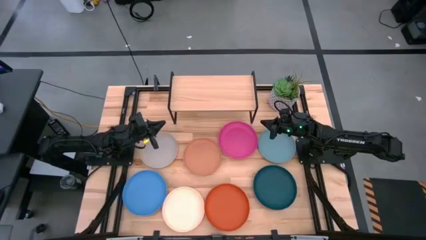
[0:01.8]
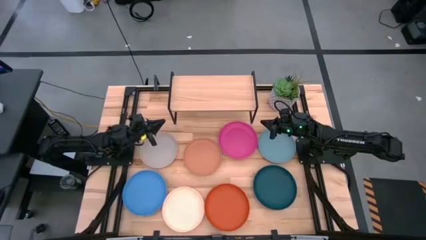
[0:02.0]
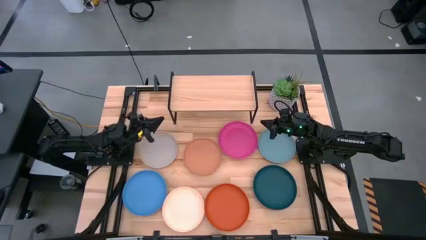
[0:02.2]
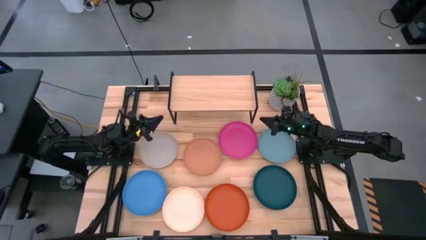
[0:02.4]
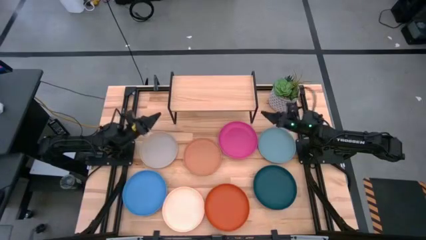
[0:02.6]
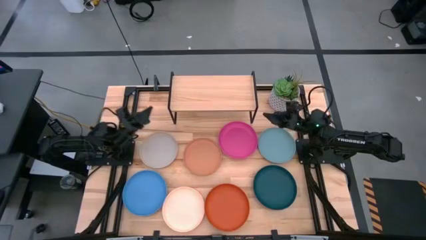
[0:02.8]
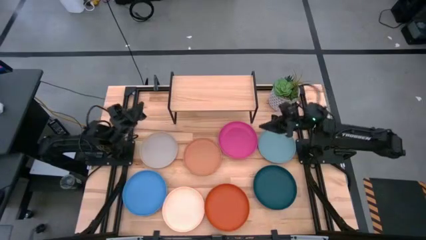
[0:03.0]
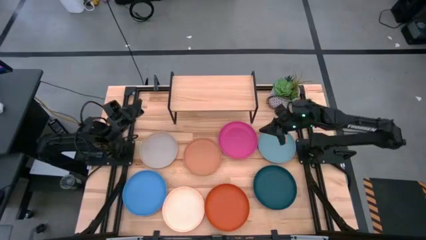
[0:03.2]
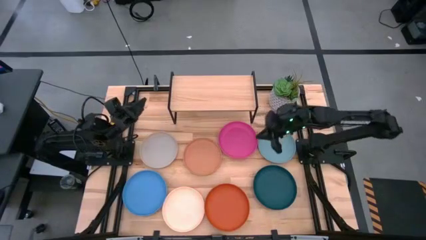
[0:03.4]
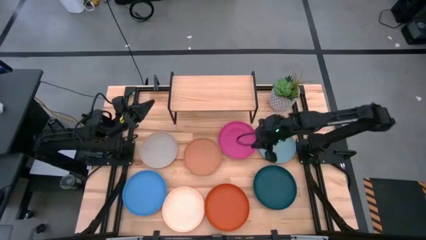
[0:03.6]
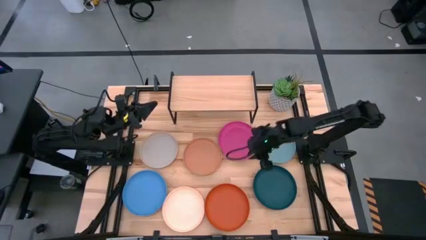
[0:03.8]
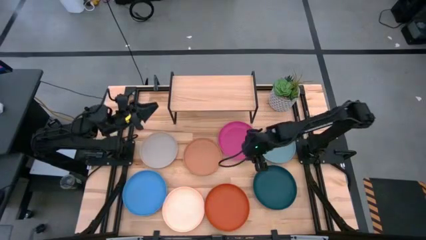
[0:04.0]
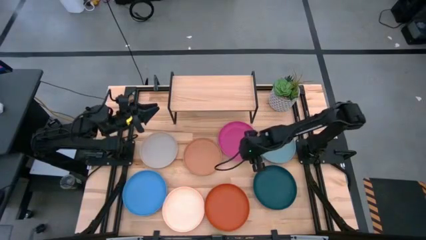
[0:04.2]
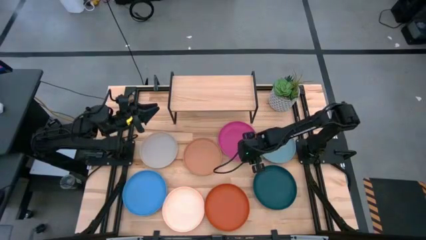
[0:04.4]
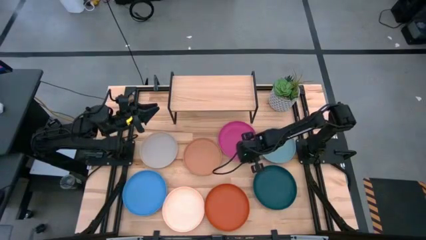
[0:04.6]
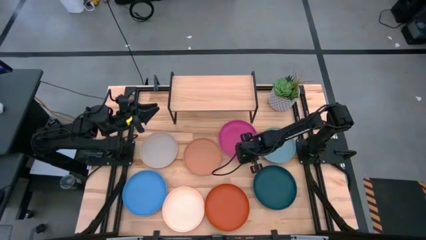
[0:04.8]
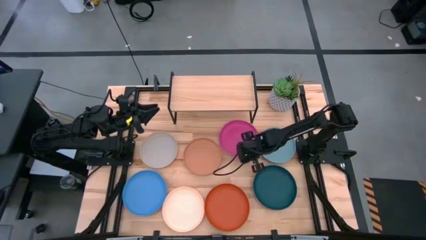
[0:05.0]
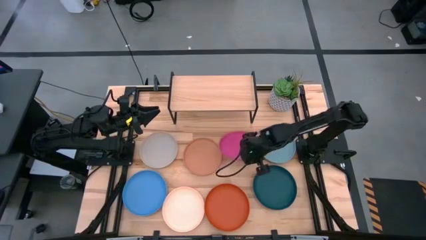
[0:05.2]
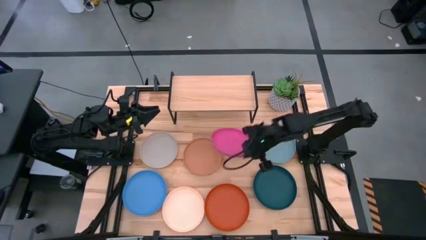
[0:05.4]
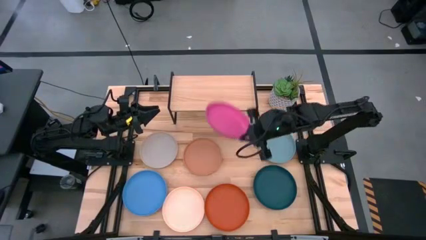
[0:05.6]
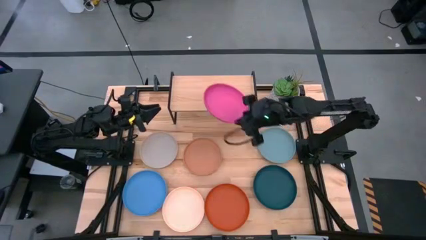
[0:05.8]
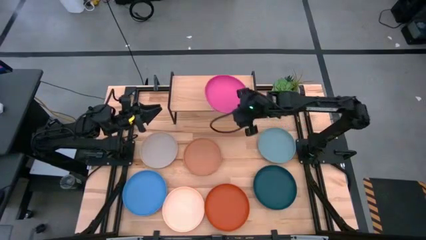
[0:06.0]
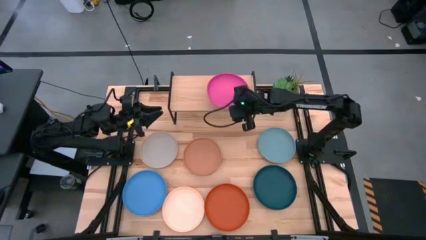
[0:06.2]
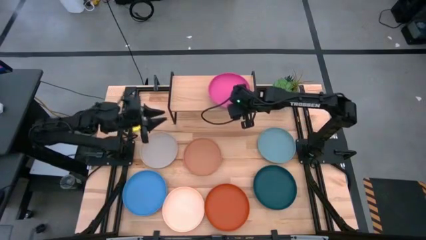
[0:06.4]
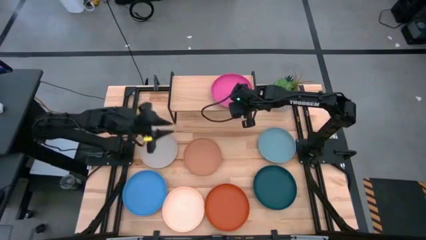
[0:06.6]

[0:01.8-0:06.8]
Task: Place and stack plates onto a shelf
Put the pink plate on the shelf

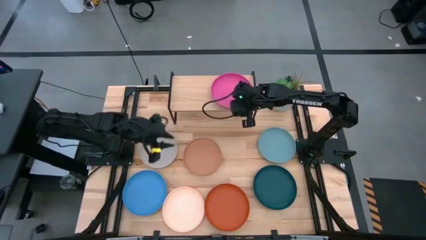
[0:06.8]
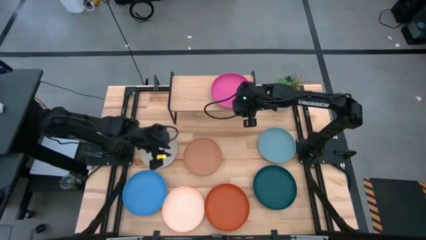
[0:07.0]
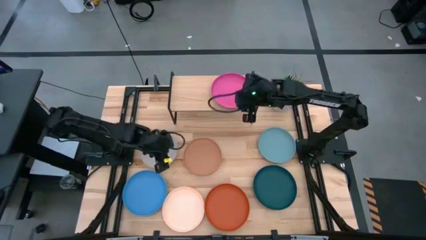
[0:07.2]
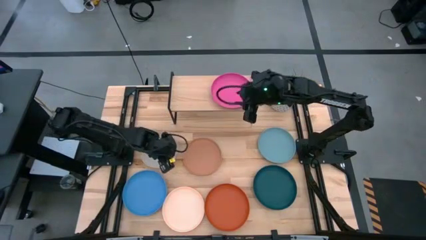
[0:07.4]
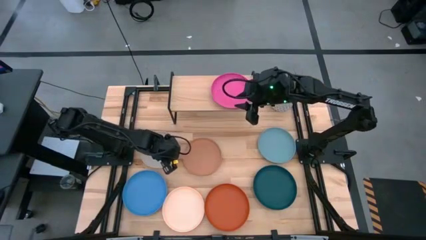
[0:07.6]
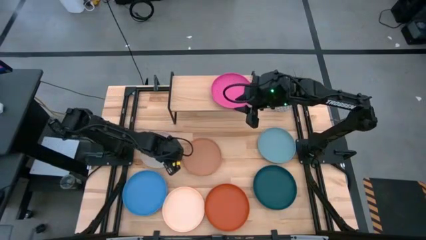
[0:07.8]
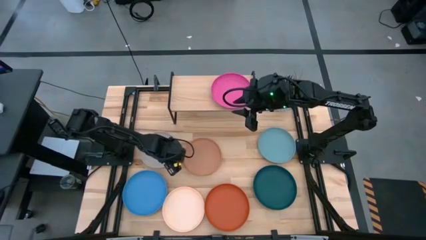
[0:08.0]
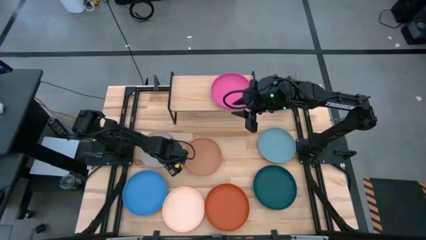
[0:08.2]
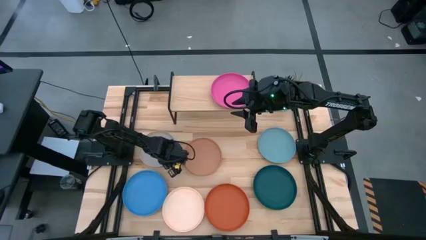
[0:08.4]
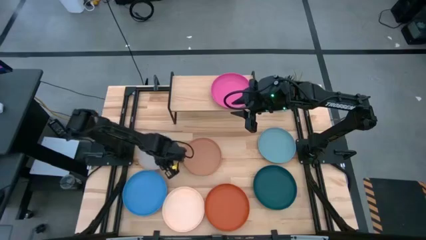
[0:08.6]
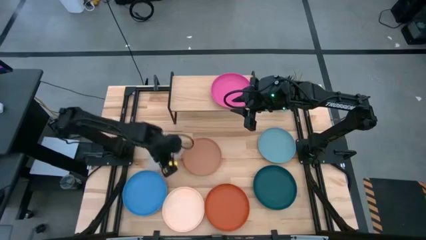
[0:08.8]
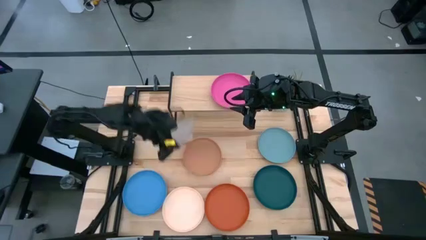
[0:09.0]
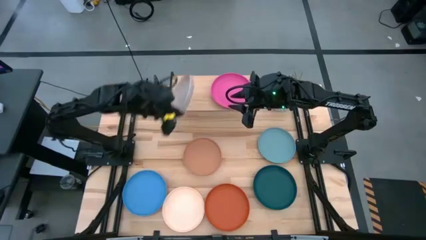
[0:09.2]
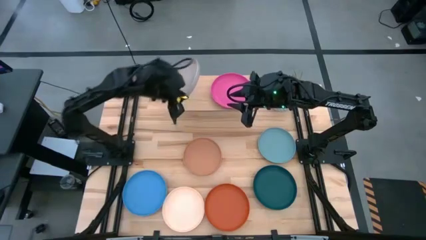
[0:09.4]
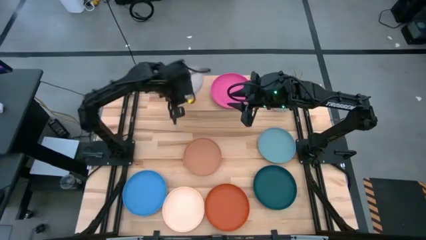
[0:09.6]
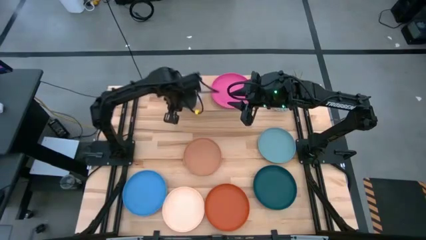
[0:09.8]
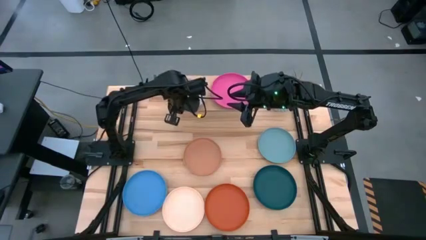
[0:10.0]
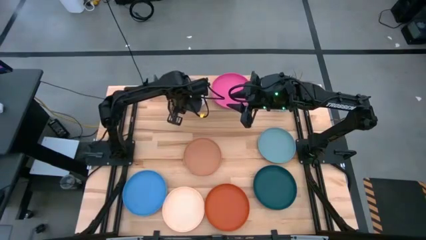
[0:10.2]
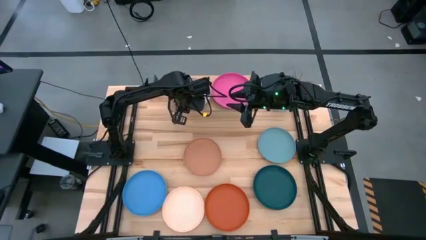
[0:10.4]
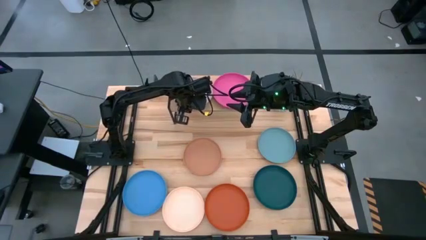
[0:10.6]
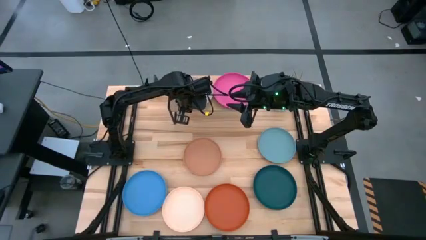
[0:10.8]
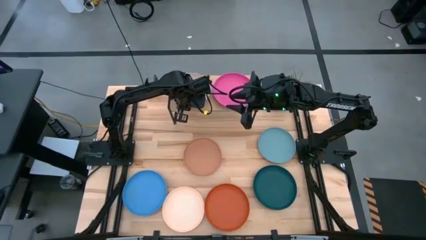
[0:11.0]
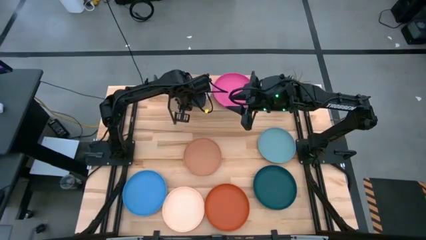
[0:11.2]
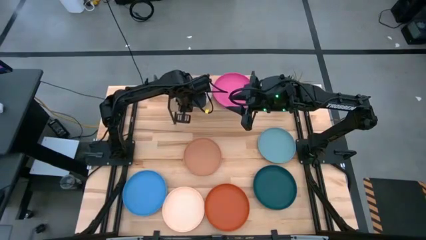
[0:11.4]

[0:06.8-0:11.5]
Put the gray plate on the shelf

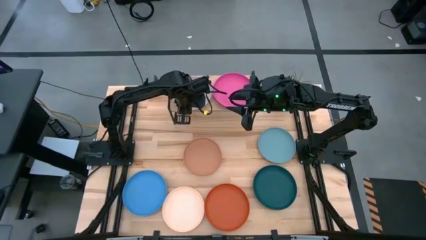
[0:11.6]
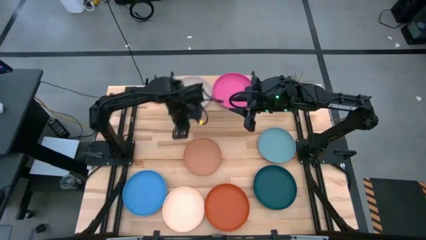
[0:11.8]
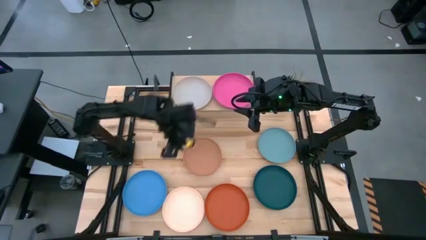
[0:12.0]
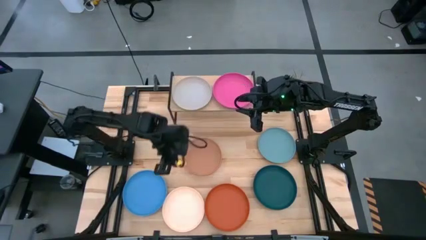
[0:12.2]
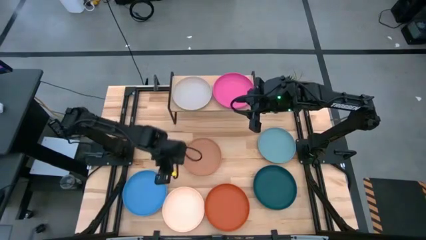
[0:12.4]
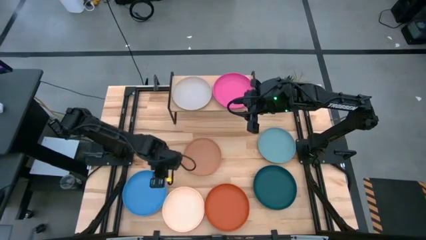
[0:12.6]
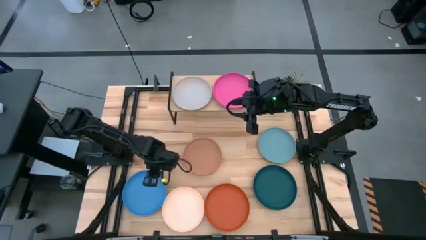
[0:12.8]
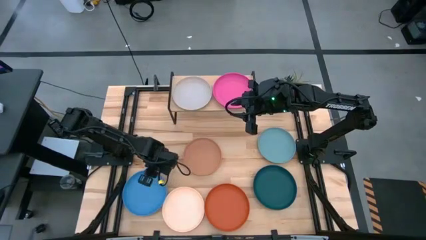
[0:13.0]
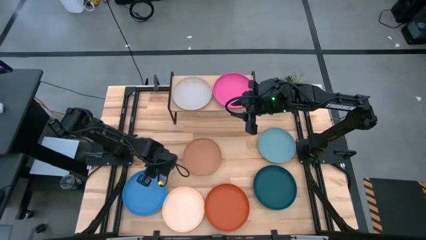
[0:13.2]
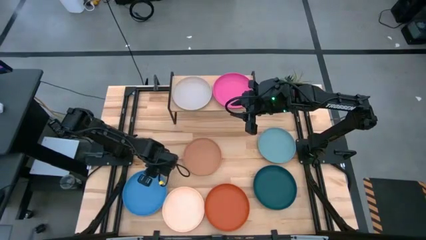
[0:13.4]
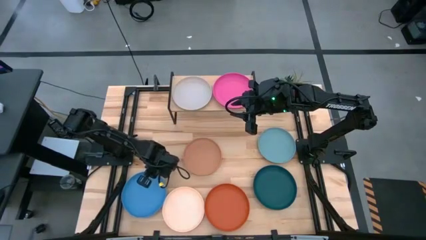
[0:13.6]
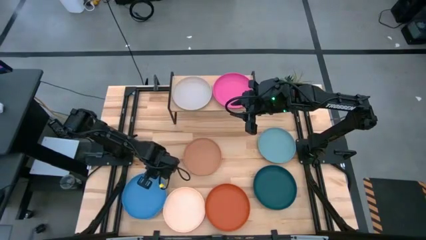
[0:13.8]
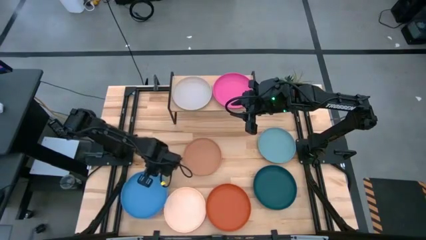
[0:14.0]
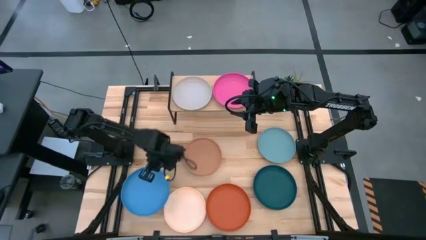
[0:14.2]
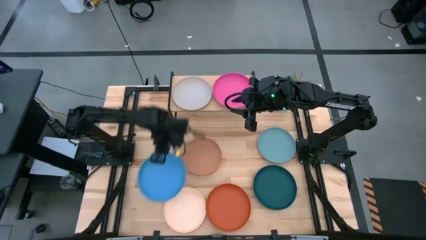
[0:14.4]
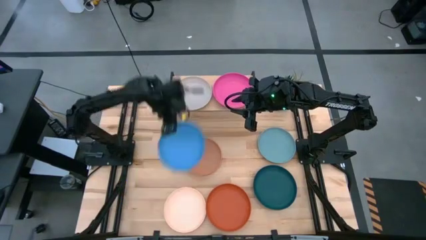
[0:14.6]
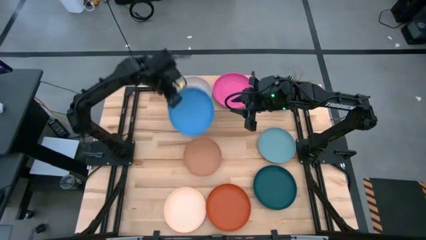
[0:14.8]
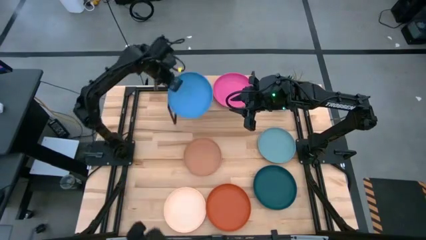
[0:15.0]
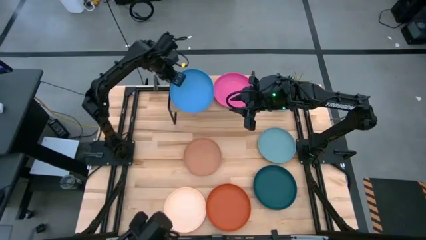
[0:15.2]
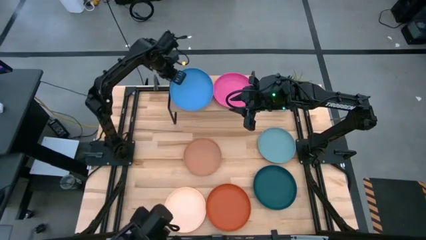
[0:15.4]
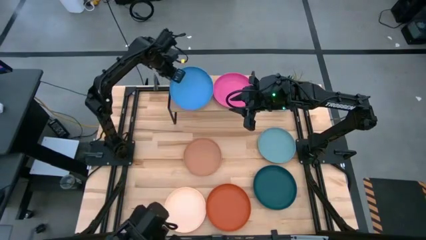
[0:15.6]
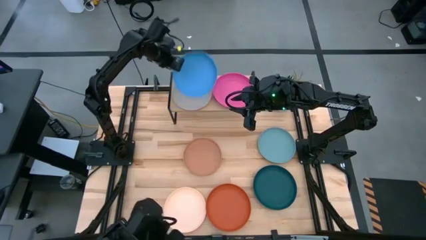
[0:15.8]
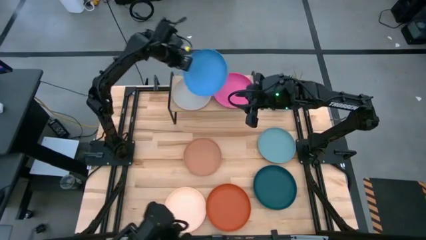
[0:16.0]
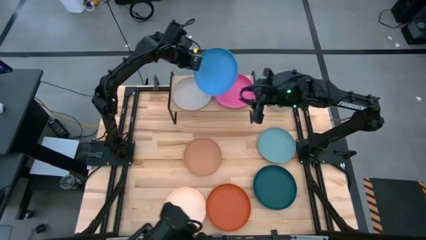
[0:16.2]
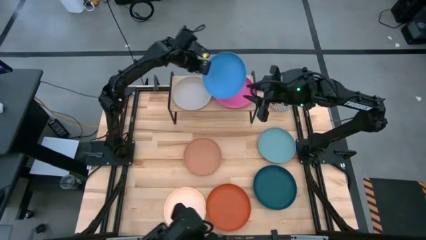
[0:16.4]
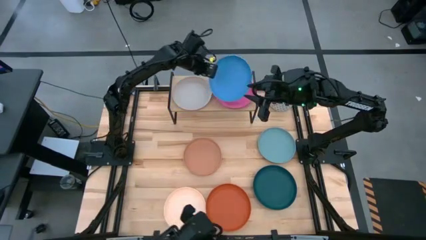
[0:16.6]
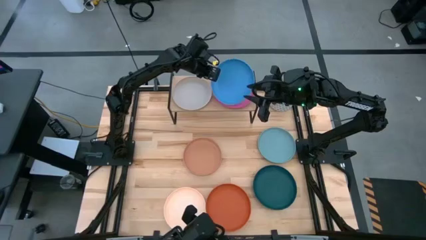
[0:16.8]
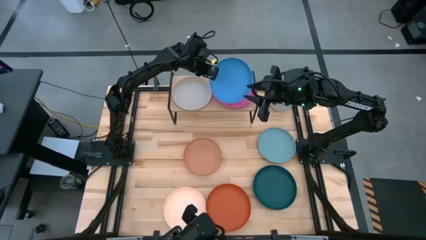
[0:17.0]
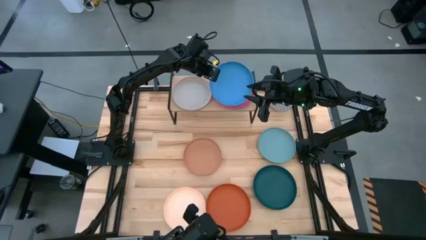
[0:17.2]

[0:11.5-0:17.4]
Stack the blue plate on the pink plate on the shelf

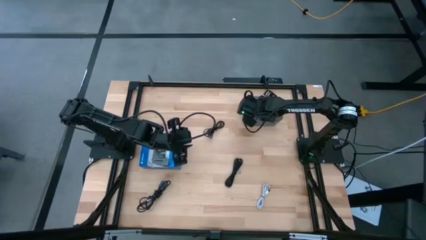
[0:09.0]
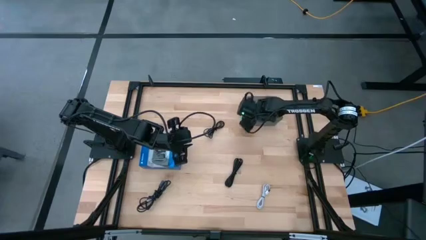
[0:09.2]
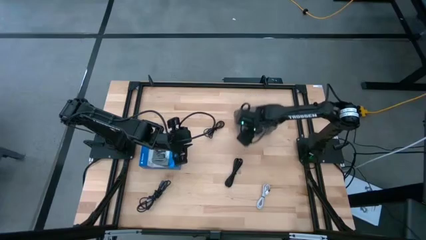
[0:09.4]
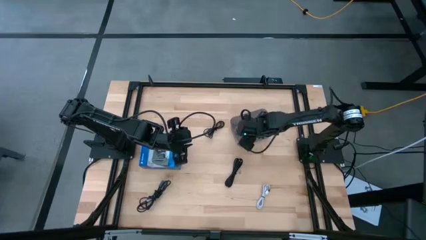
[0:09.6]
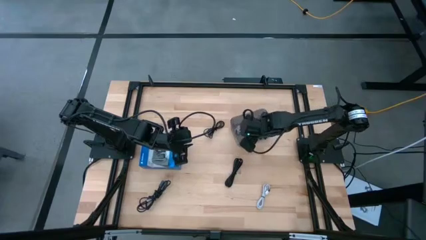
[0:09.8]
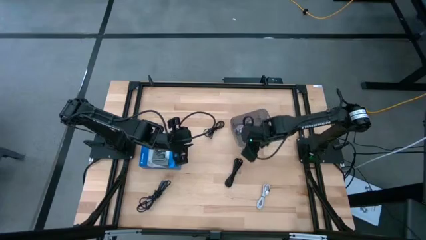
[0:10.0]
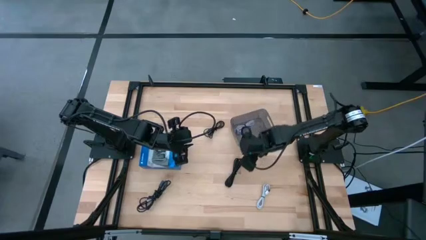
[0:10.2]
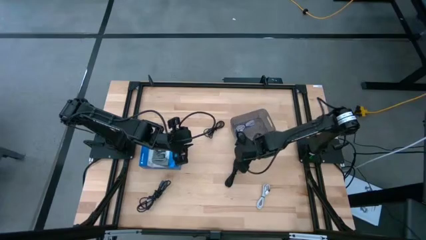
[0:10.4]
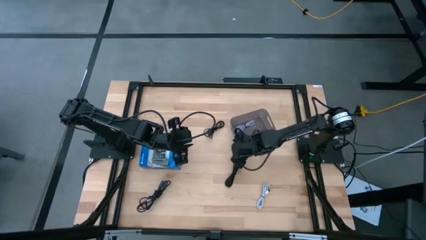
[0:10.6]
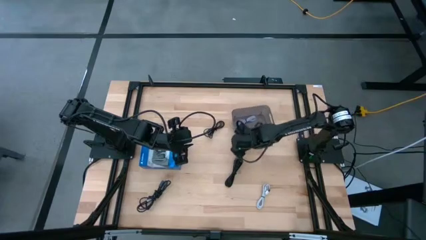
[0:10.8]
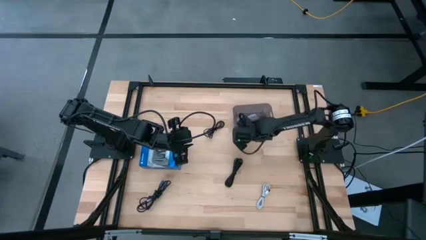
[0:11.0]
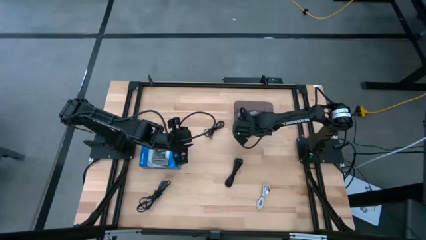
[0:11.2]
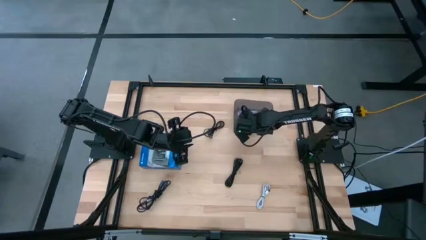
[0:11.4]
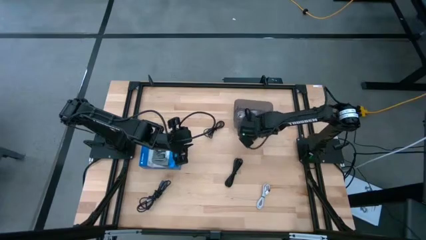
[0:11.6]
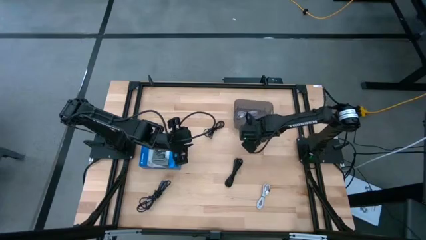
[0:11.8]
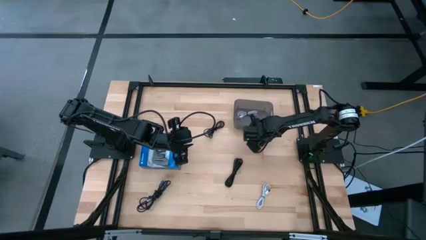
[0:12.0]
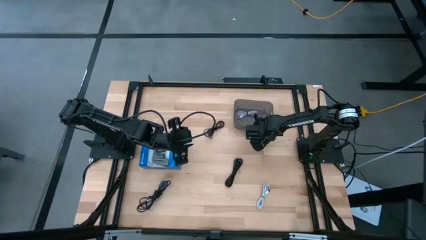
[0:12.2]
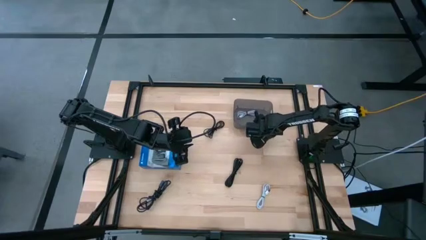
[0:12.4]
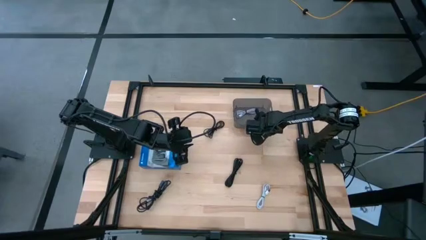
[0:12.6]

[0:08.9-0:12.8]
Task: Pick and place USB-C Cables
Adjust the black bin
